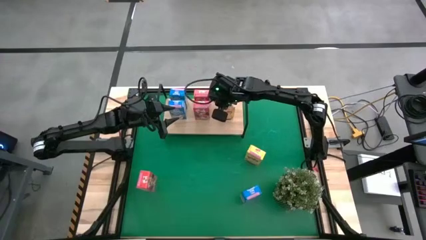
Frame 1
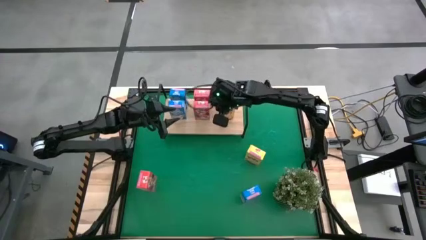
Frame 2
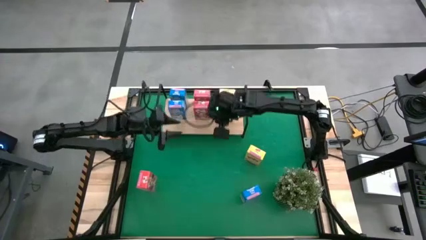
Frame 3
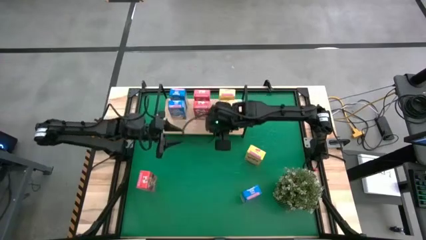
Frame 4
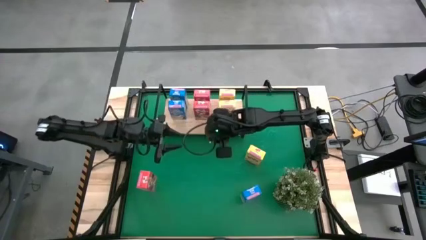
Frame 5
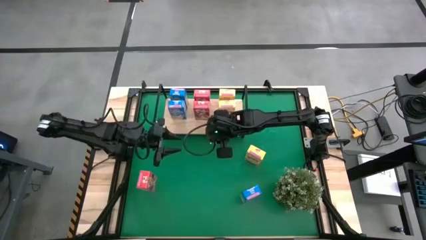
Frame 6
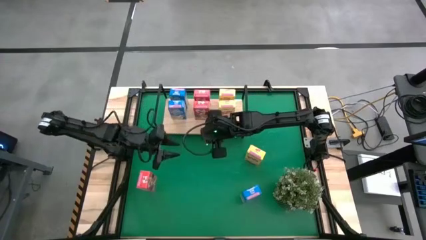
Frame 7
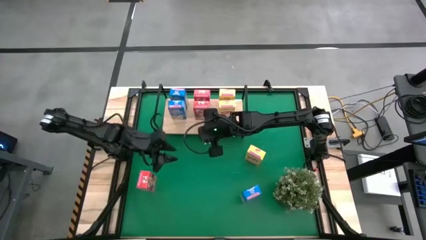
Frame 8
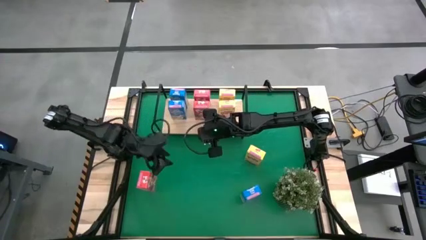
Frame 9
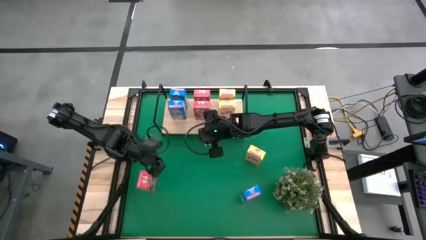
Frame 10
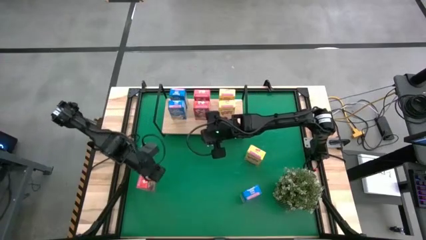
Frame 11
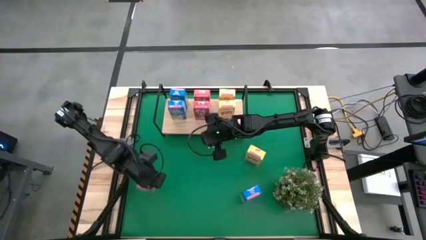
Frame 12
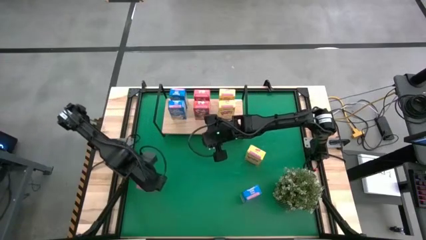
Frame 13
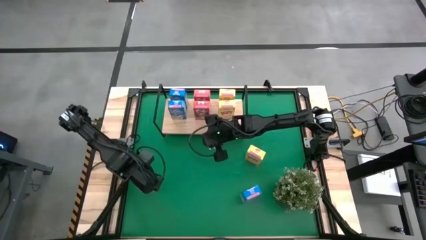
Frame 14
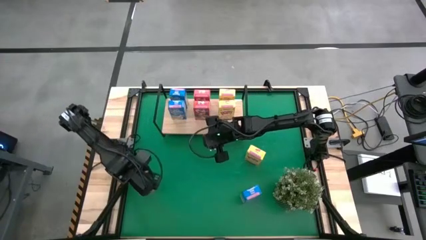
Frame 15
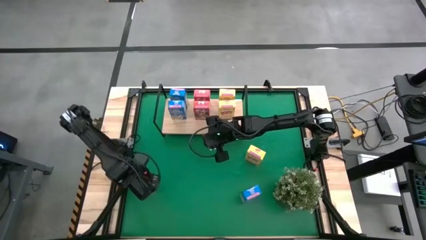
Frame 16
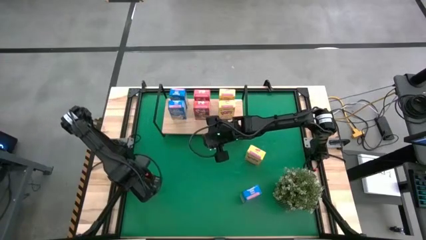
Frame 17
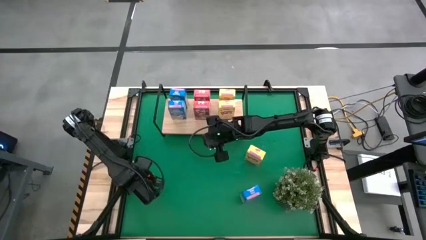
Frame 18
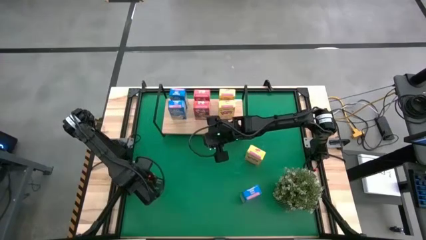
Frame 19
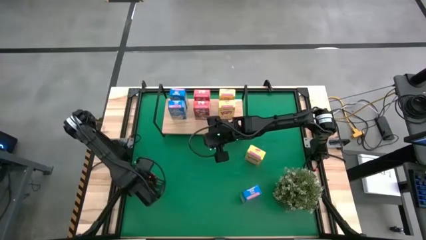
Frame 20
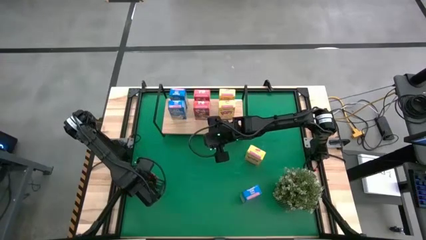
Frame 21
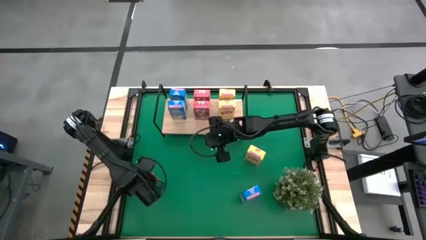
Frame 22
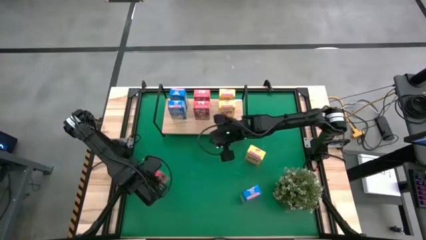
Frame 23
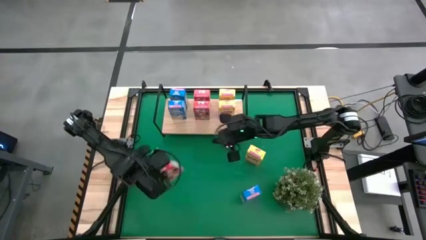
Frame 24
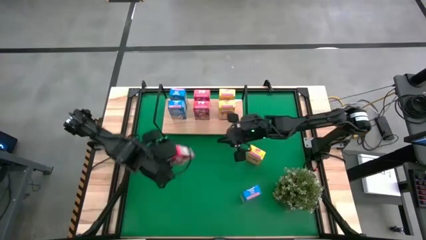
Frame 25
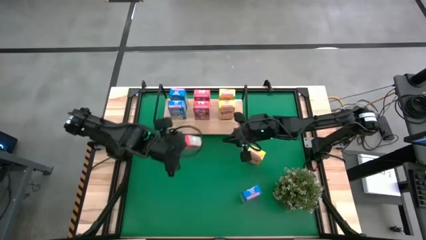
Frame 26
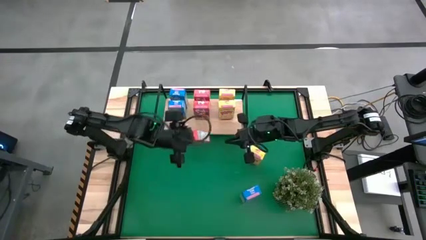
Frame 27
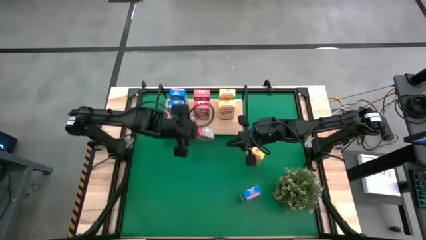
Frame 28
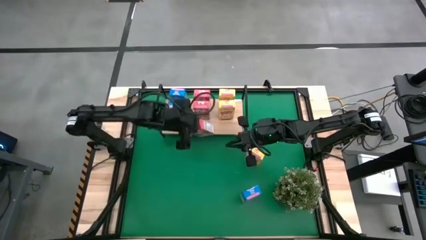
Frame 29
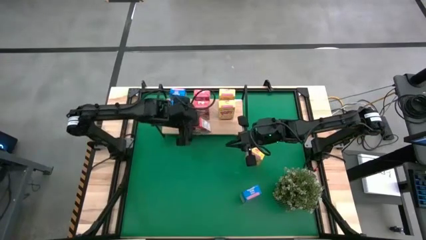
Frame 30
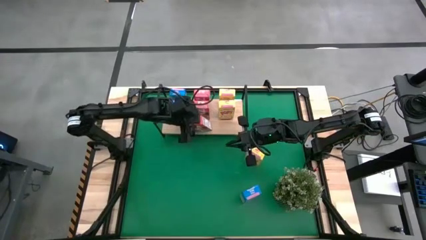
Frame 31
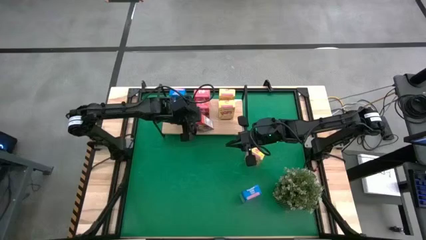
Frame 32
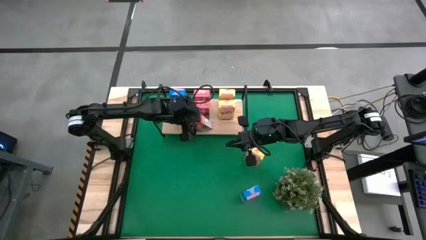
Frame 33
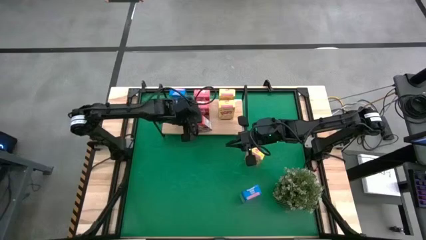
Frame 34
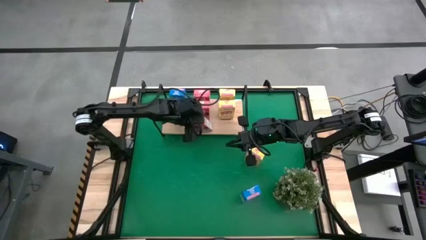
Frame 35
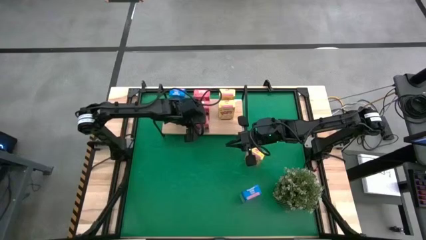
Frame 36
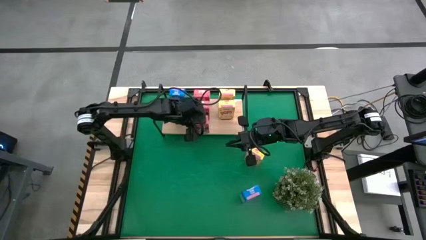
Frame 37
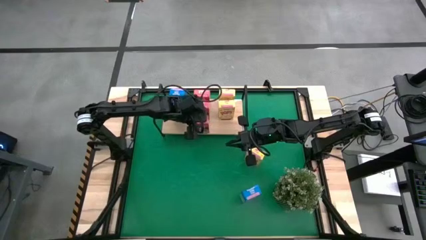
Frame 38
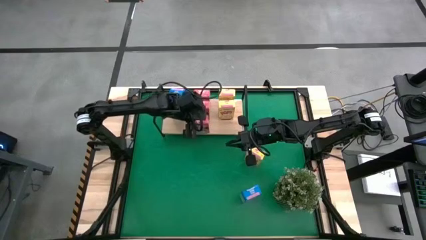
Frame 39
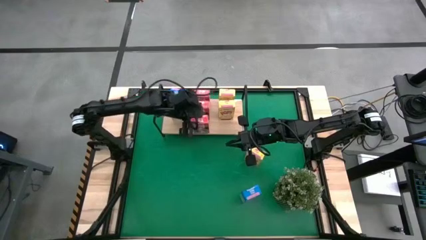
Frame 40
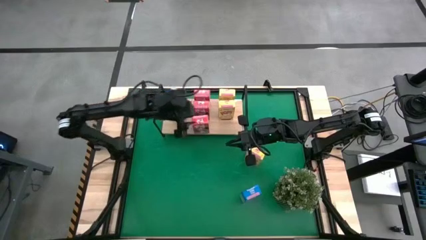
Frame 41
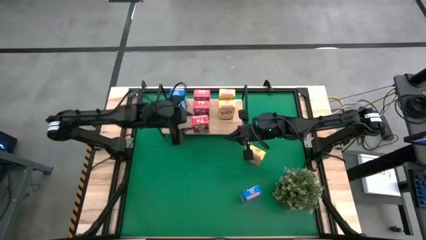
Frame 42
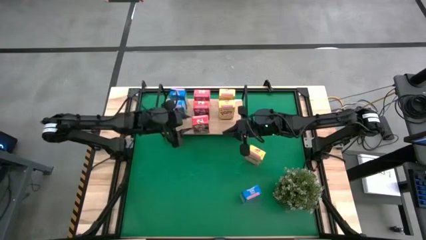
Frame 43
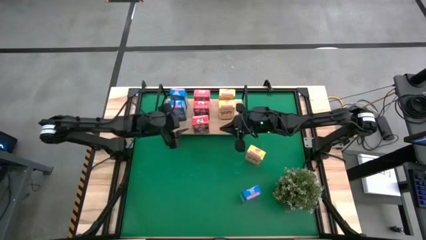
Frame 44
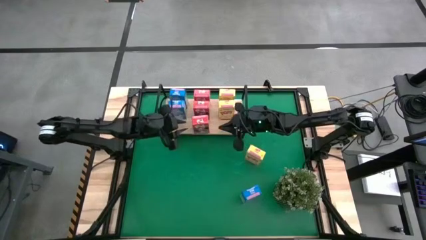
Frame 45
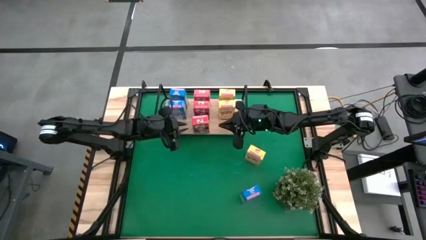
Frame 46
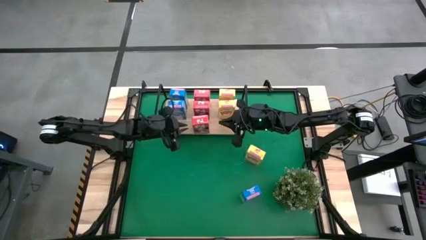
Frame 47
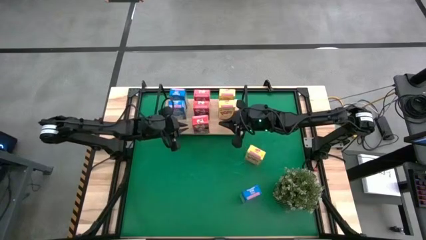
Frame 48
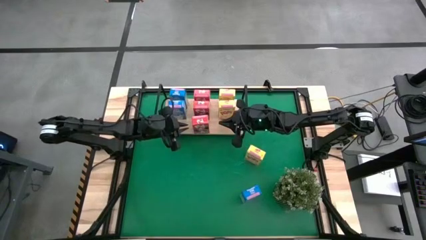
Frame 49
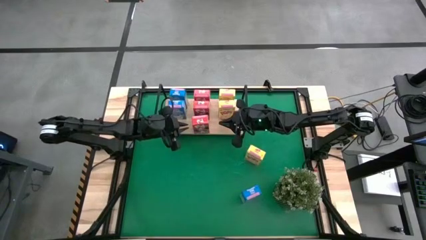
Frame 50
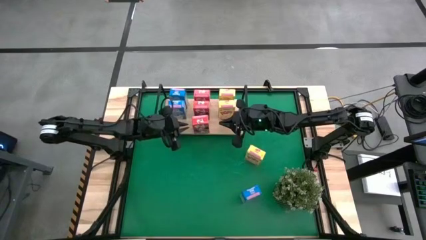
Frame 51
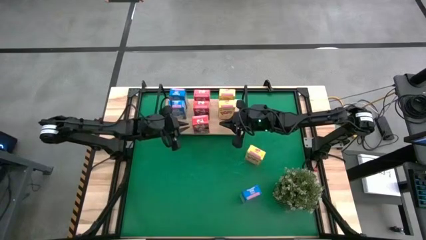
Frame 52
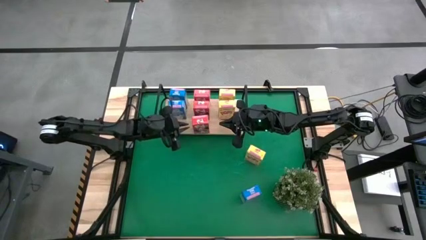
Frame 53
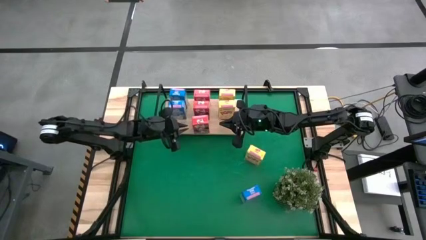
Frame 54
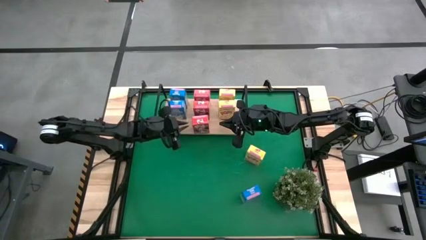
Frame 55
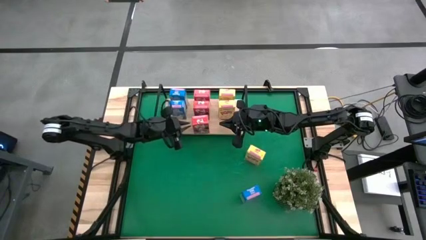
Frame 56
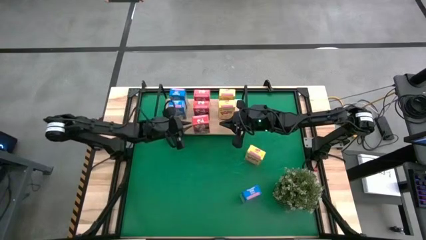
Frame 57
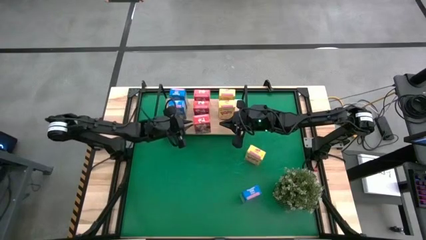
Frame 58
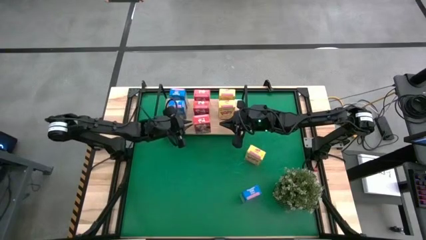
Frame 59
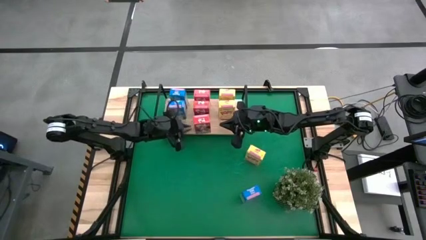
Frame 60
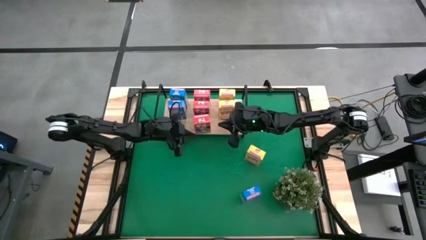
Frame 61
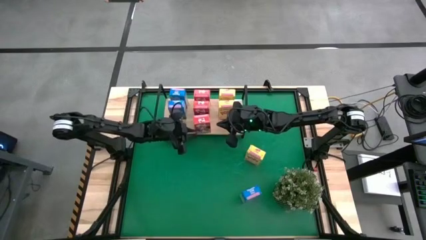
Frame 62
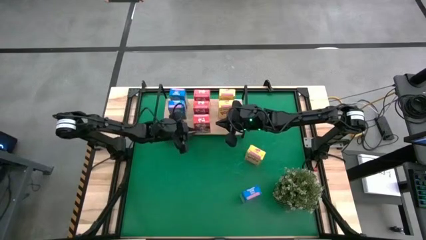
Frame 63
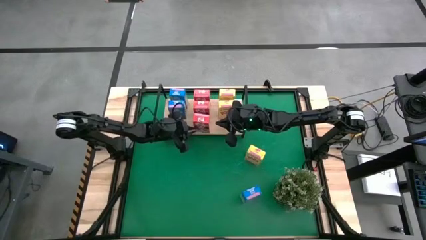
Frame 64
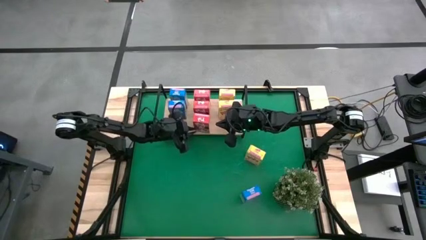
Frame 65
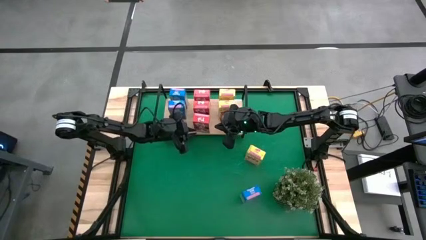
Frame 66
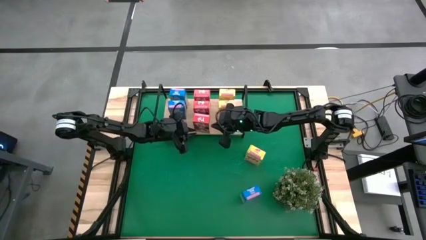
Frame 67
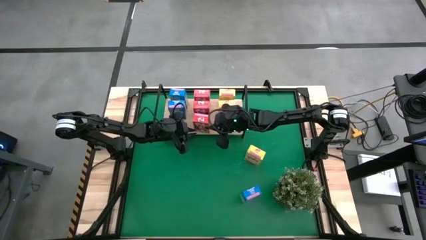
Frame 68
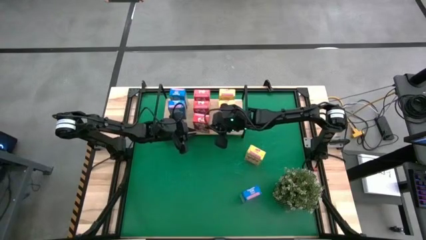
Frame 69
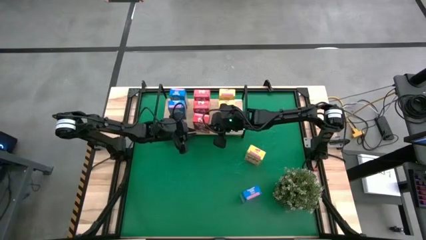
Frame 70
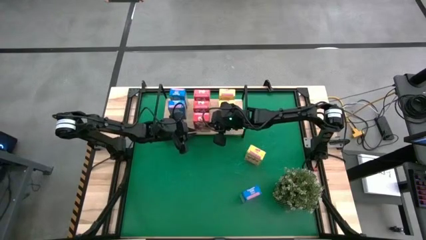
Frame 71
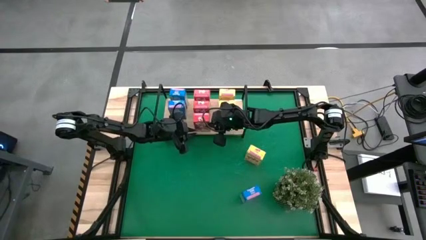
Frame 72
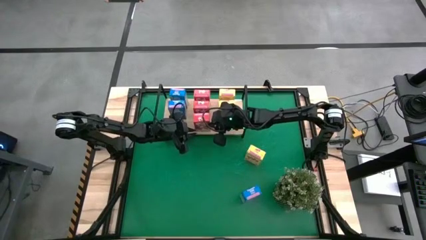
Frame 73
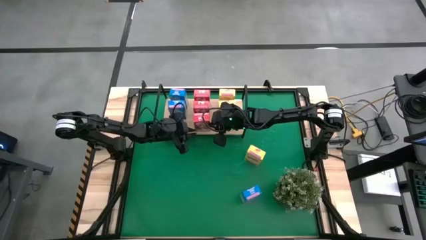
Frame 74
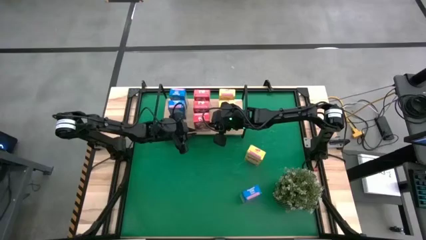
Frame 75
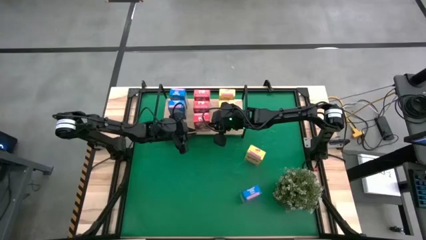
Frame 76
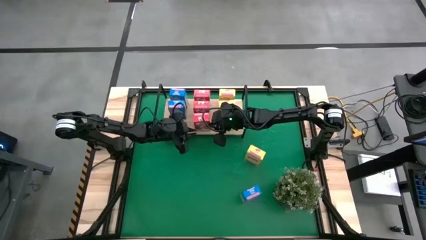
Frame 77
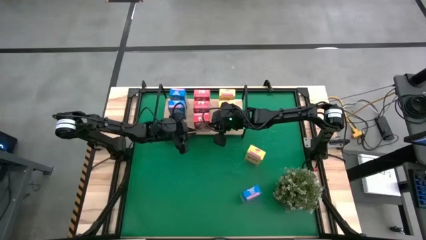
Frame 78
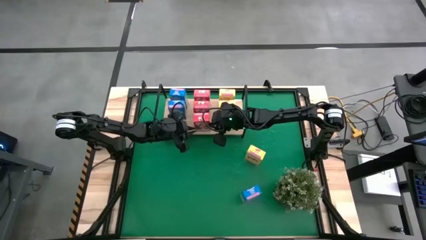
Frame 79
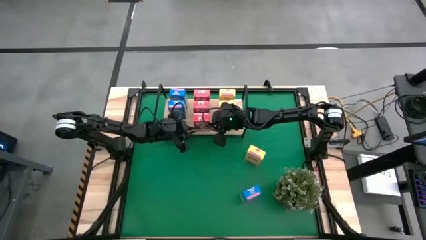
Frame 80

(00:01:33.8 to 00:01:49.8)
Task: Stack cereal on shelf
Put the red cereal box on the shelf aligned with the other red cereal box
